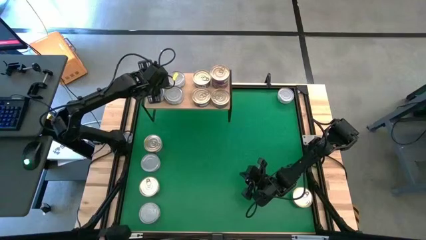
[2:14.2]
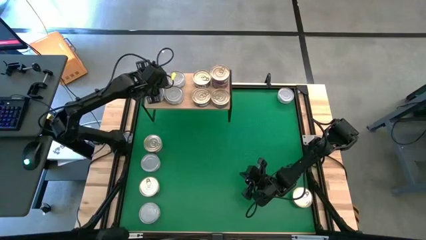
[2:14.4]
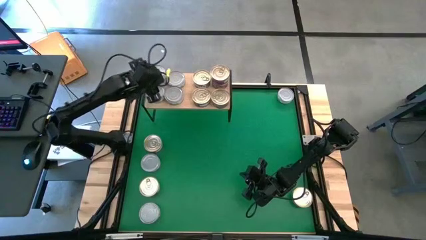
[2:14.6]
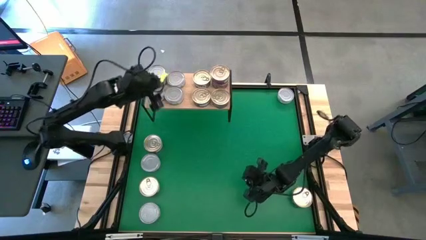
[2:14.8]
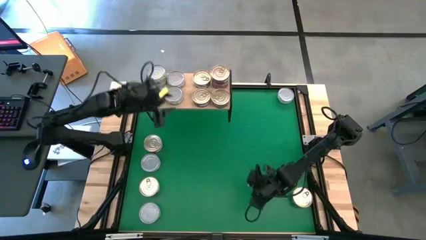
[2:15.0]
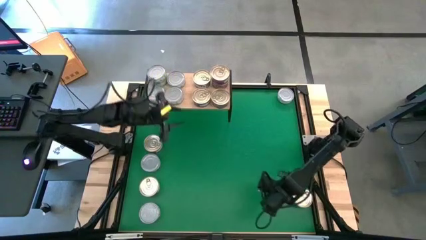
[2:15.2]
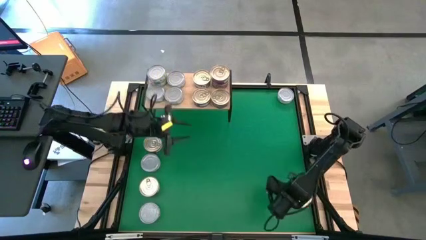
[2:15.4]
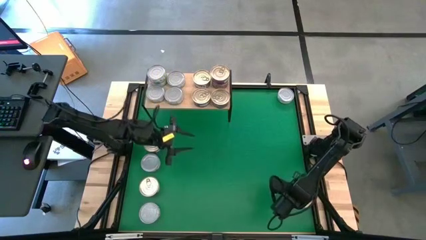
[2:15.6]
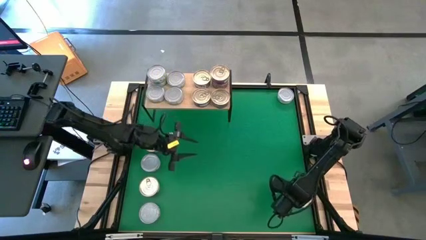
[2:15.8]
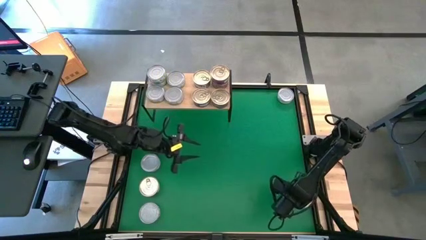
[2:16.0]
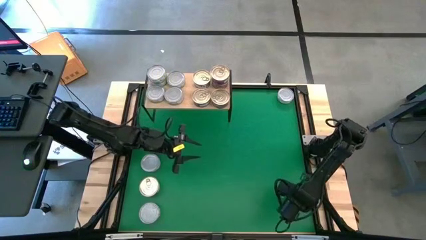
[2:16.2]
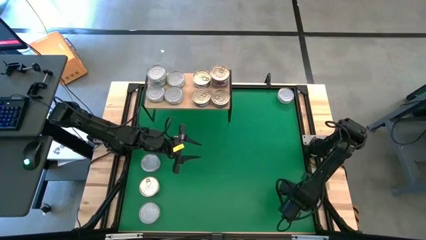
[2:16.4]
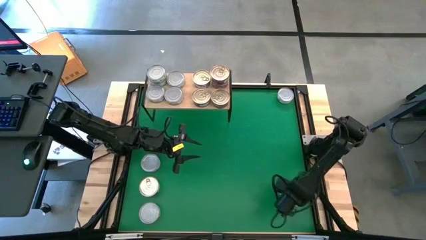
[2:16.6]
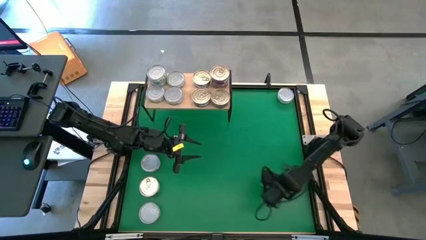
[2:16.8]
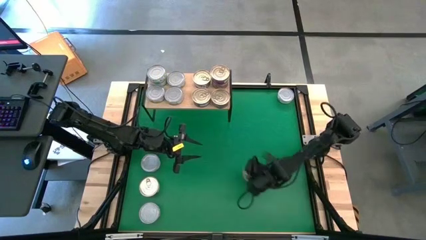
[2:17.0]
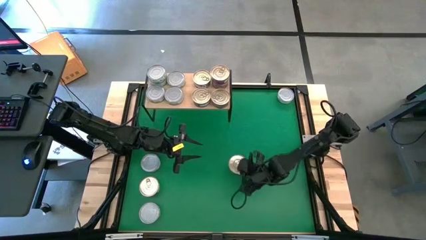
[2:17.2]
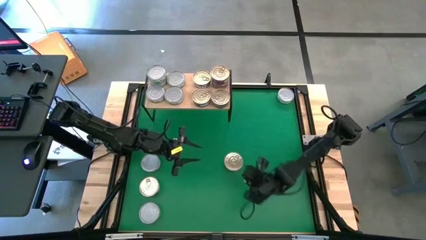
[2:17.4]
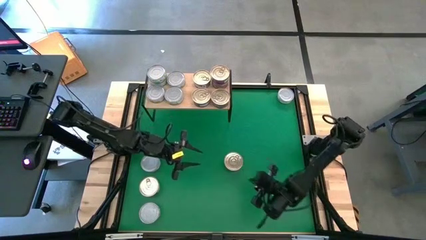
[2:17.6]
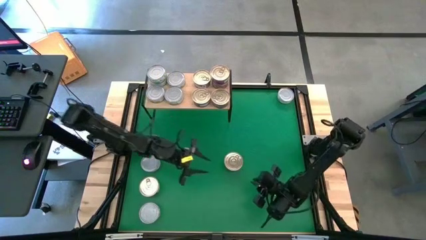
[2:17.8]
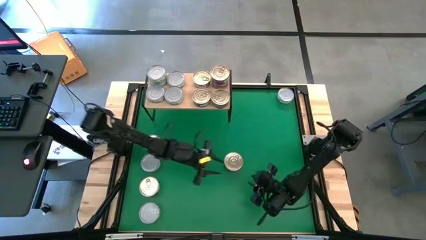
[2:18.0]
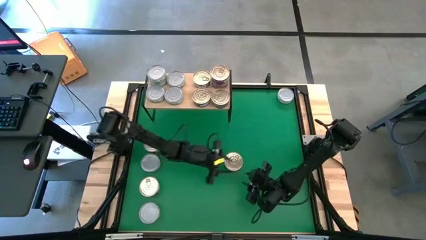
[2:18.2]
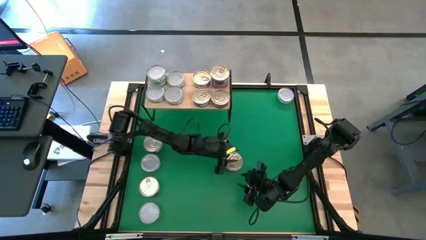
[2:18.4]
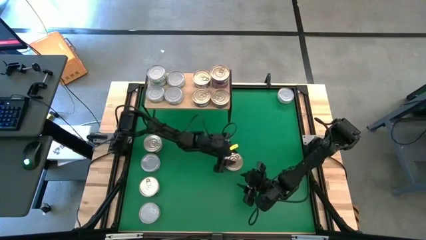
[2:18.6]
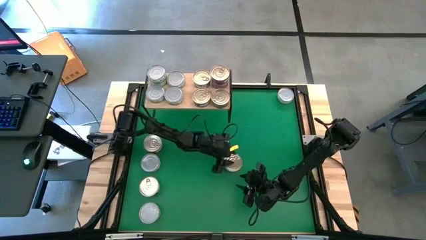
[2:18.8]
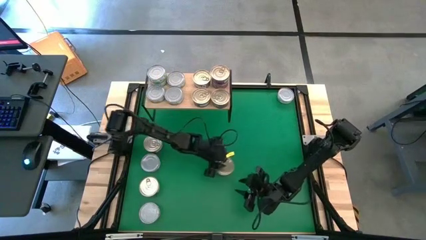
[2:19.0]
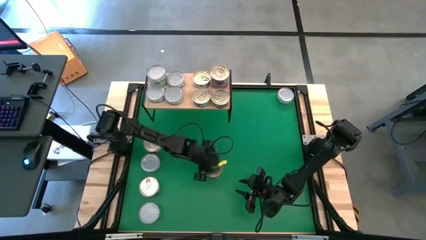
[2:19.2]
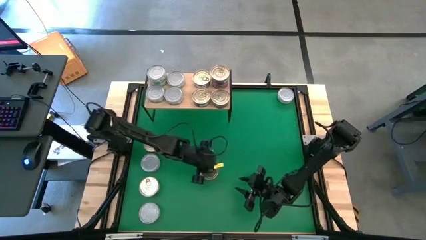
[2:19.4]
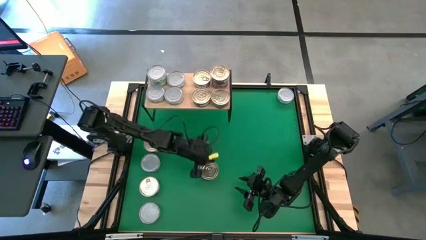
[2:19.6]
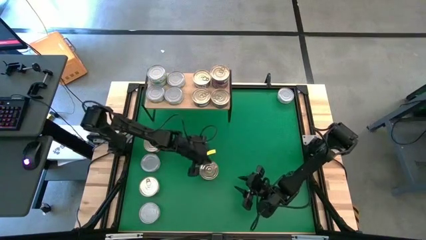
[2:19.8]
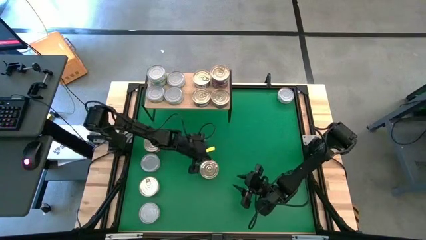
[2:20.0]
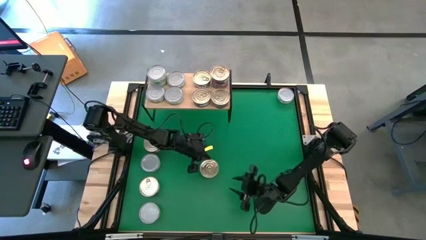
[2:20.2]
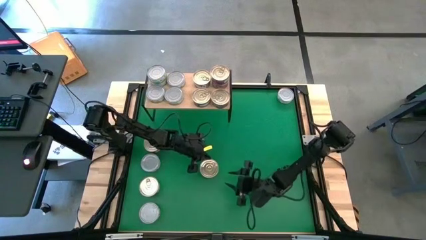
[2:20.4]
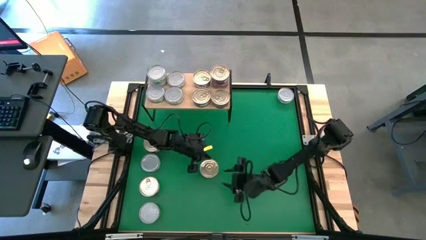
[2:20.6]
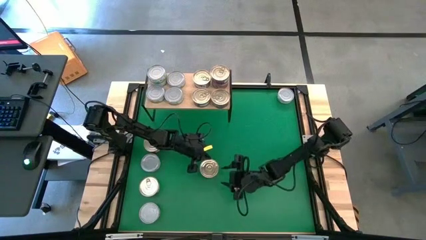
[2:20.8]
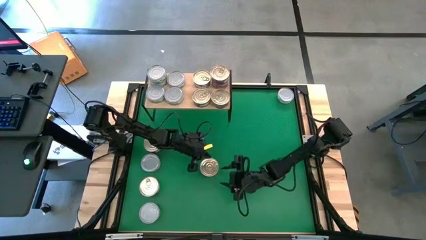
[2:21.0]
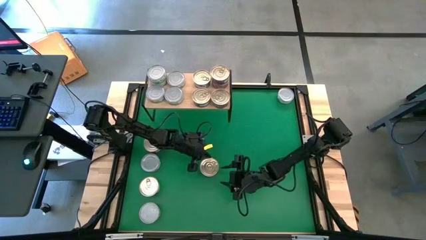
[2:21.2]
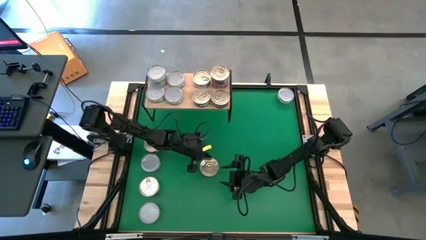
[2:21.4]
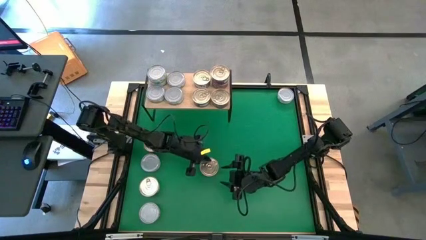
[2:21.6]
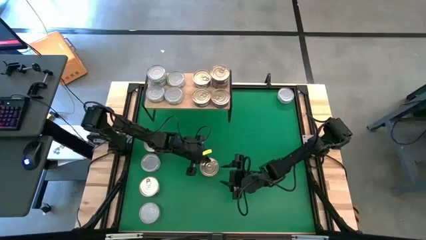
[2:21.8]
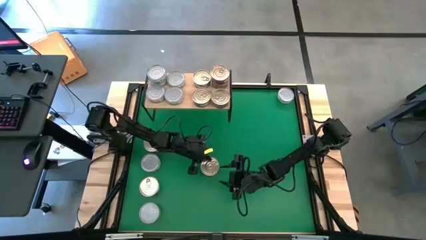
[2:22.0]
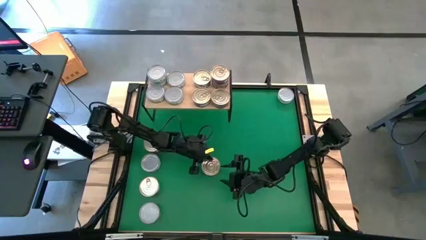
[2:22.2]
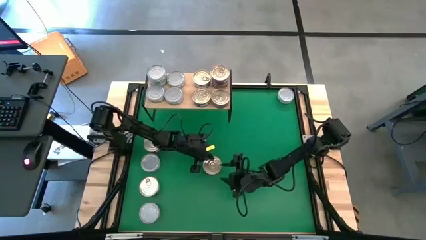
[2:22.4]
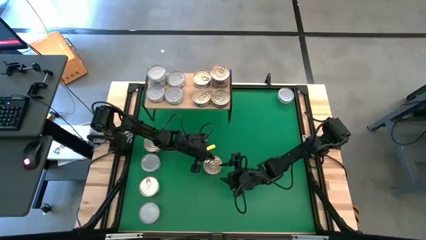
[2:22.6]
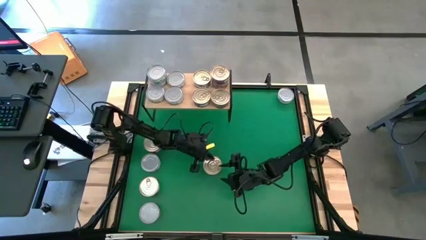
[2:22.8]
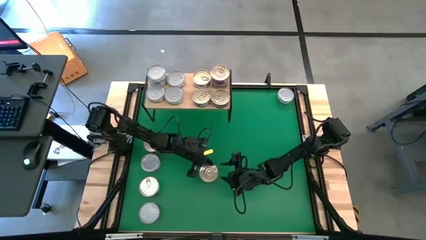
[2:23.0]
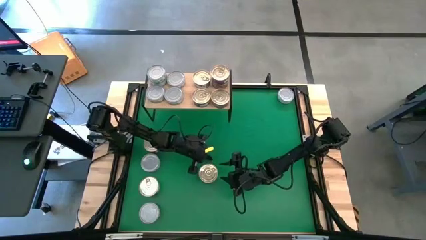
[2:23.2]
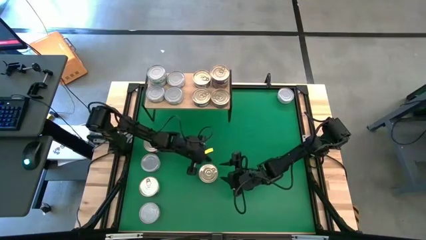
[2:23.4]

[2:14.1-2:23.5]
Task: Stack canned seafood by type on shelf
Stack the blue-pink tuna can on top of the other blue-pink tuna can on the shelf

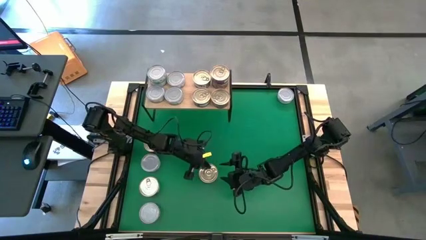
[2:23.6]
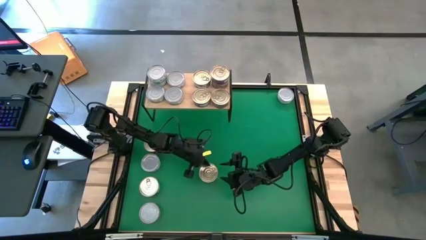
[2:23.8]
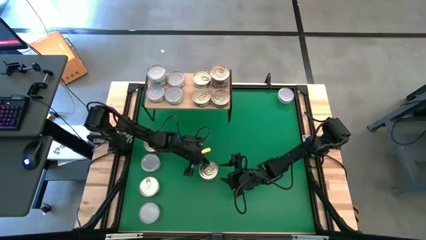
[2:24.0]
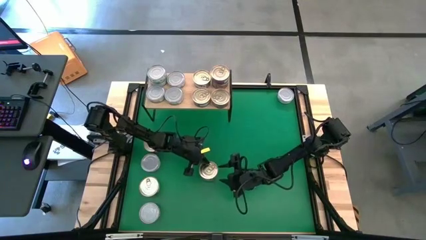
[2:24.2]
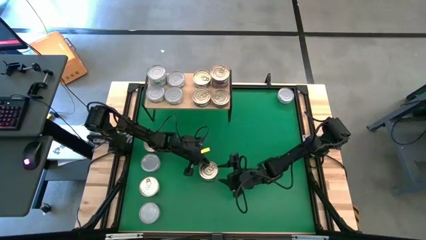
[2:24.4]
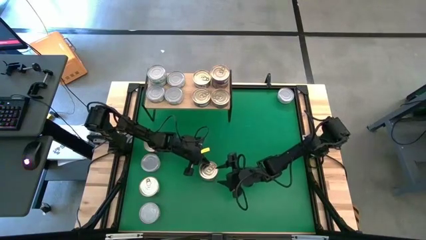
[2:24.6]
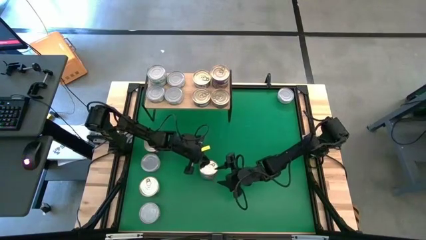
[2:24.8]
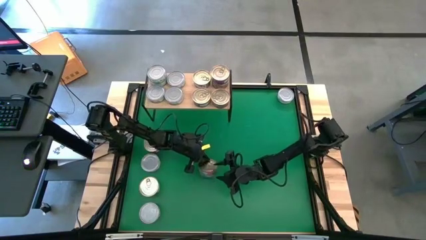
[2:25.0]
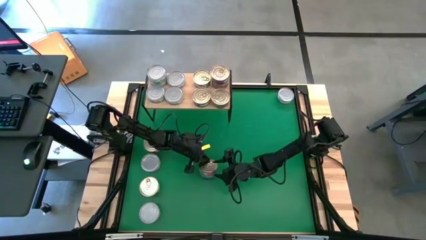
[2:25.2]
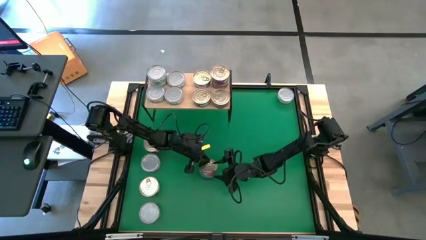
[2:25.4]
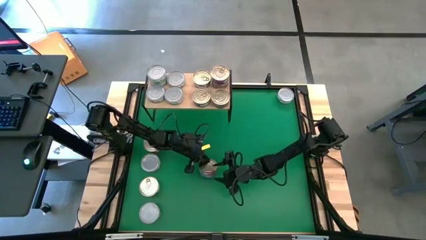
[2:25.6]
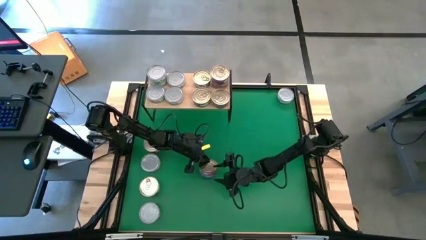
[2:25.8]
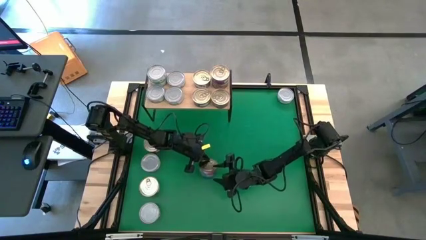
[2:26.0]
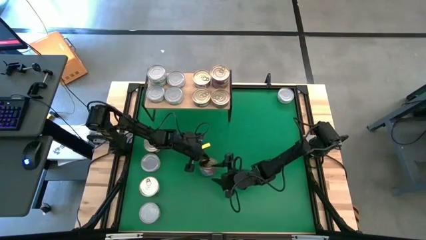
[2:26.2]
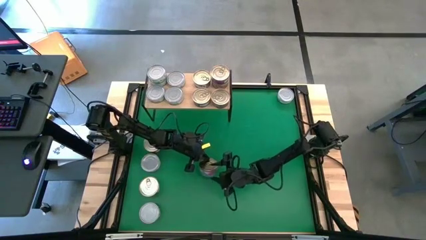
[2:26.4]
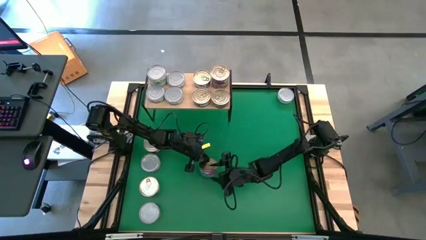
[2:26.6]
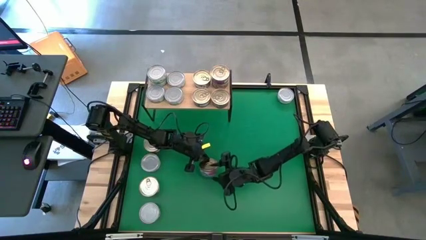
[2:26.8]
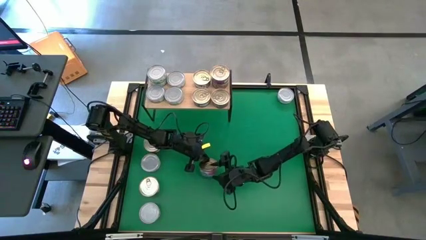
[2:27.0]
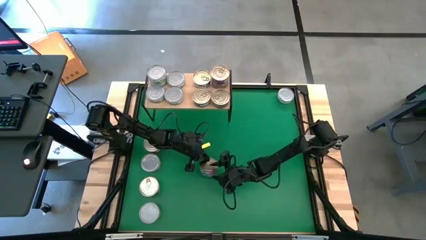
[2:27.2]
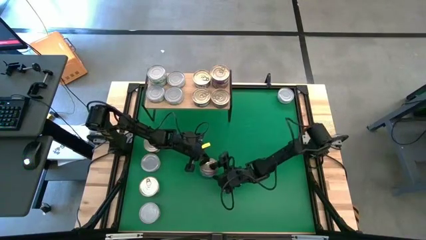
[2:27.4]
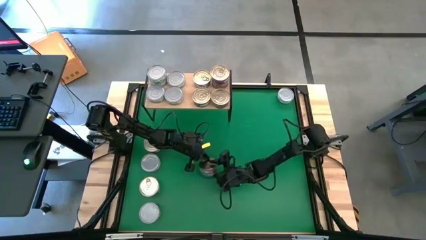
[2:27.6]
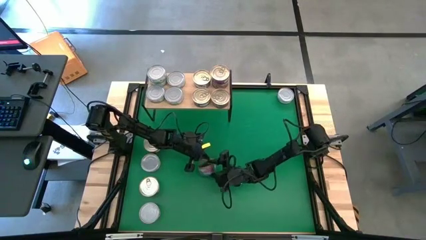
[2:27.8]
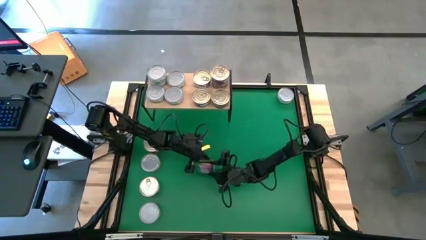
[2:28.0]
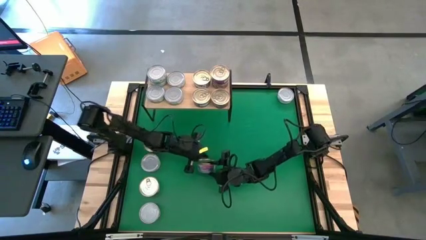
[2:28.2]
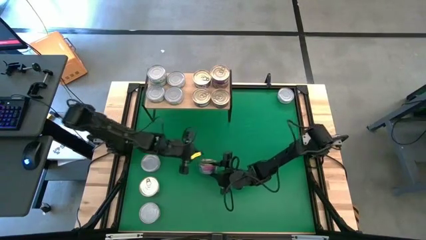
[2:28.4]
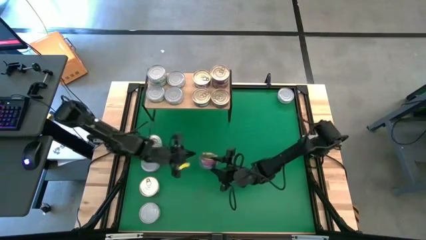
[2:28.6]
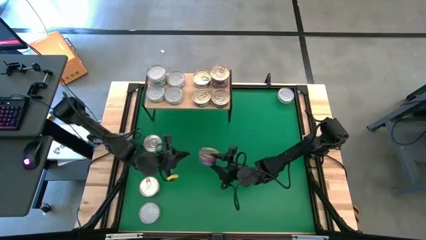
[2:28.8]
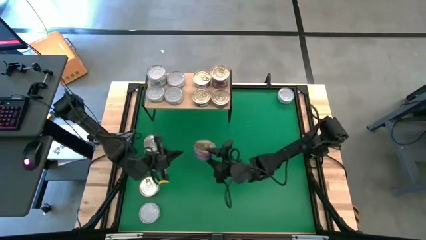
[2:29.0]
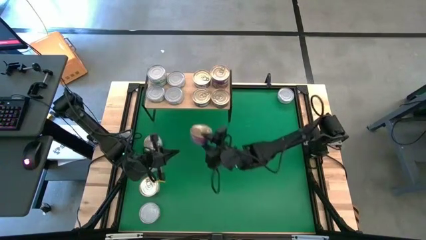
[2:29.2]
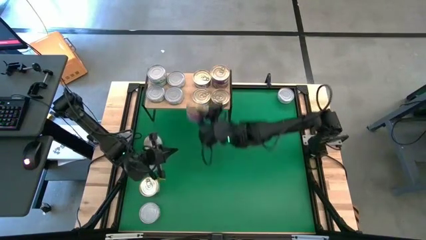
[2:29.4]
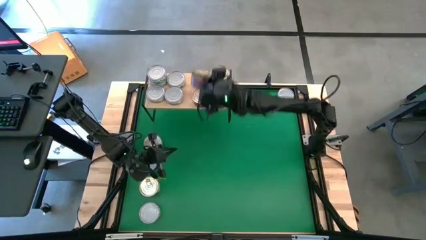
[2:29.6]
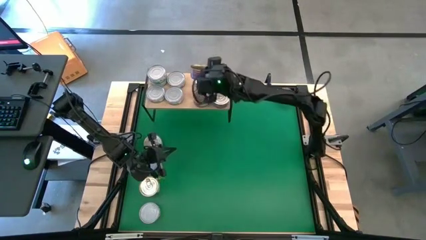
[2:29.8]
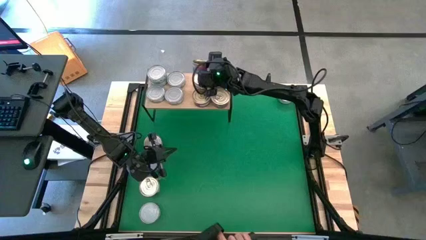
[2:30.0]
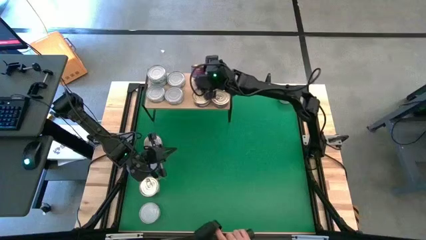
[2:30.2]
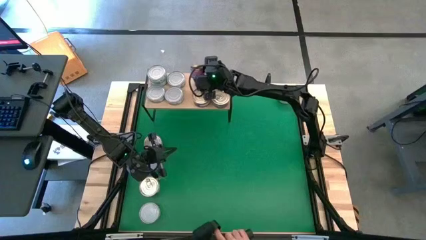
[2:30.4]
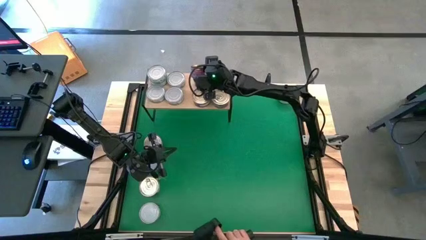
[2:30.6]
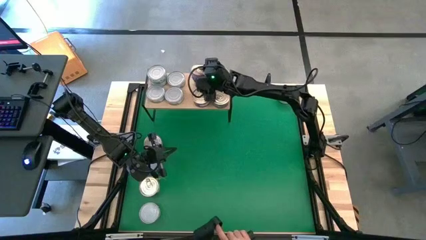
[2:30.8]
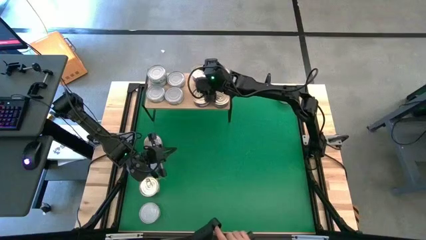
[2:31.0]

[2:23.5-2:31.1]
Stack the blue-pink tuna can on top of the other blue-pink tuna can on the shelf
